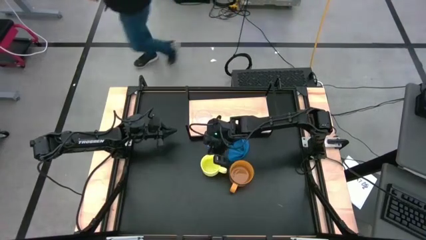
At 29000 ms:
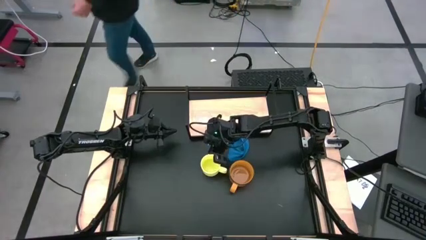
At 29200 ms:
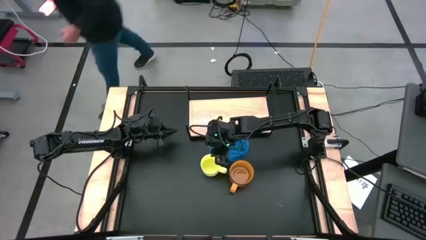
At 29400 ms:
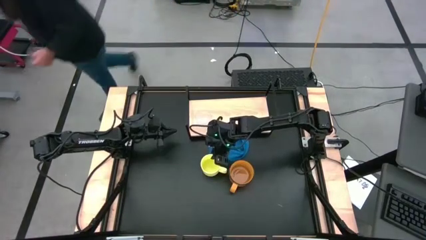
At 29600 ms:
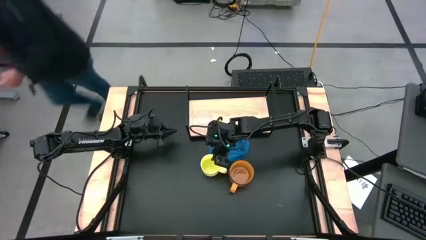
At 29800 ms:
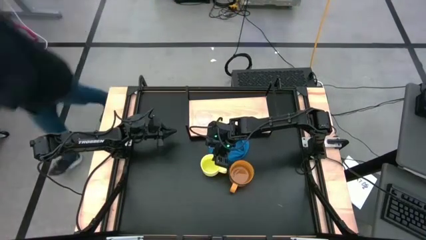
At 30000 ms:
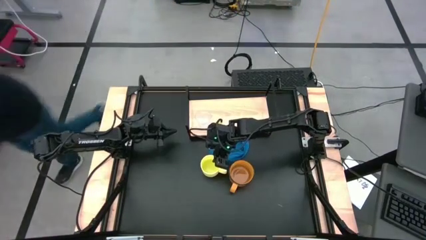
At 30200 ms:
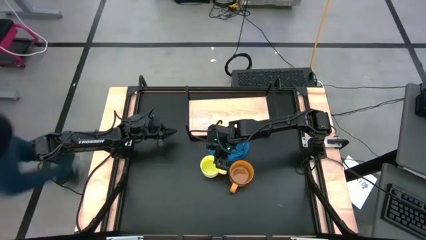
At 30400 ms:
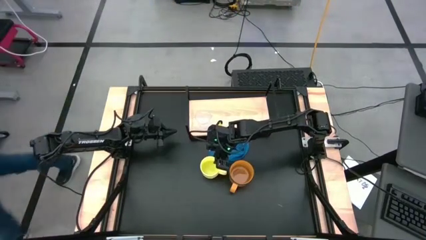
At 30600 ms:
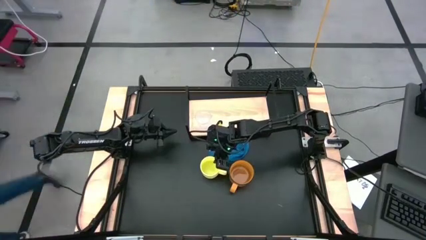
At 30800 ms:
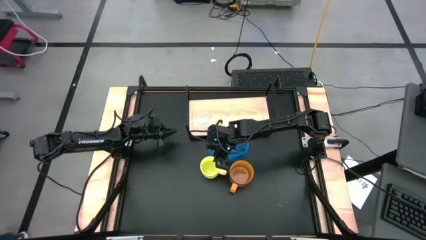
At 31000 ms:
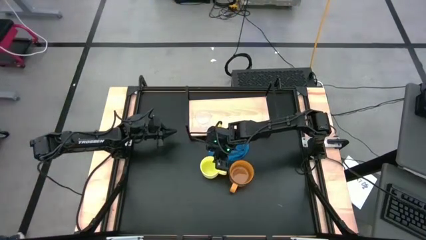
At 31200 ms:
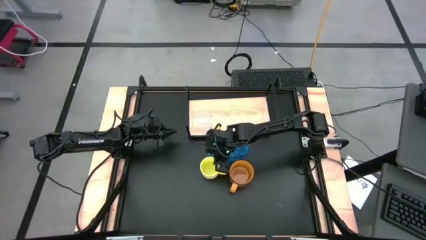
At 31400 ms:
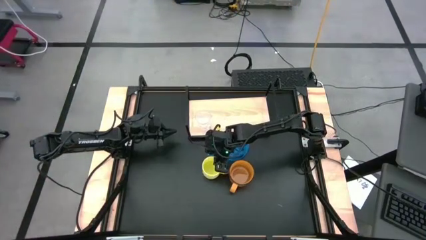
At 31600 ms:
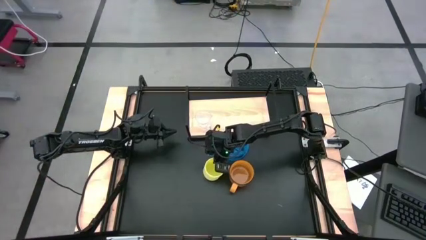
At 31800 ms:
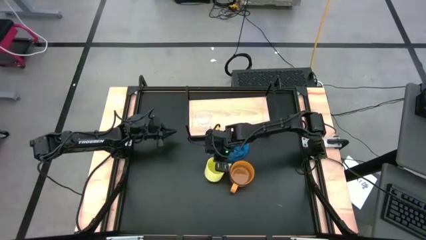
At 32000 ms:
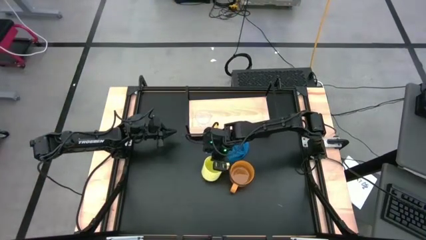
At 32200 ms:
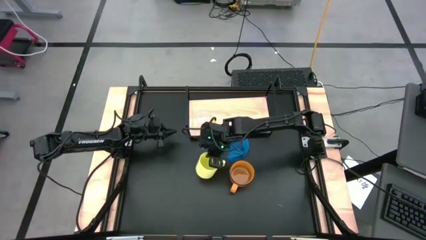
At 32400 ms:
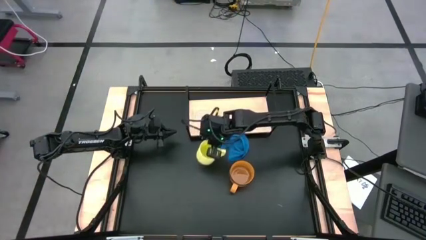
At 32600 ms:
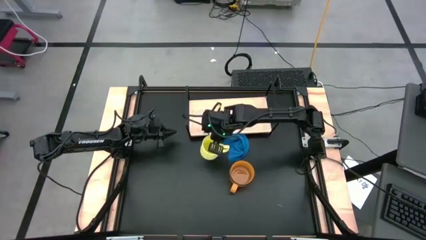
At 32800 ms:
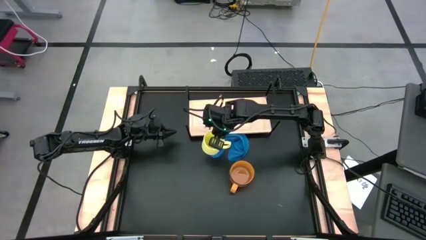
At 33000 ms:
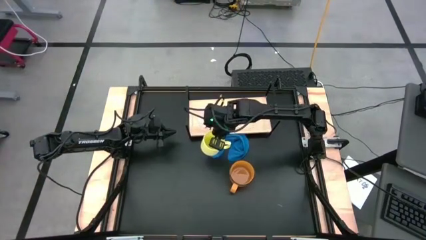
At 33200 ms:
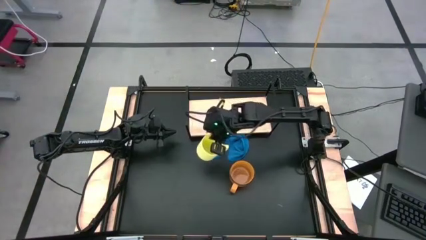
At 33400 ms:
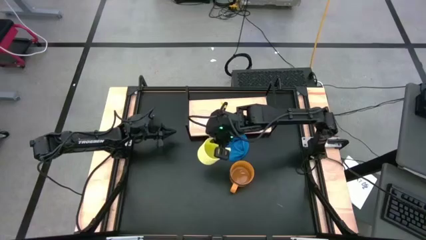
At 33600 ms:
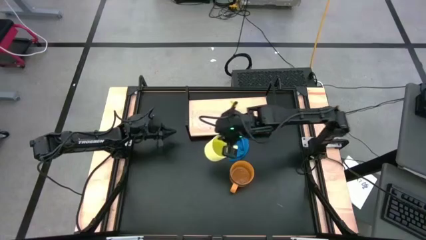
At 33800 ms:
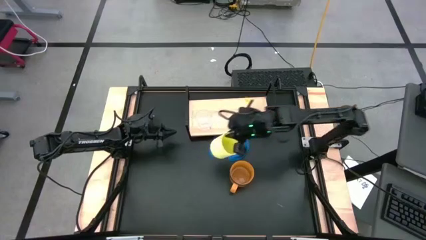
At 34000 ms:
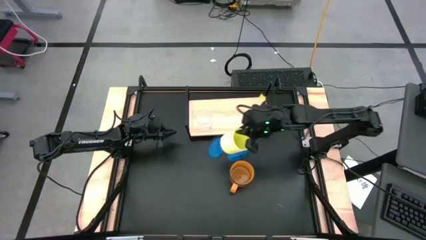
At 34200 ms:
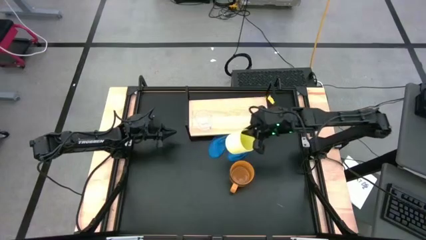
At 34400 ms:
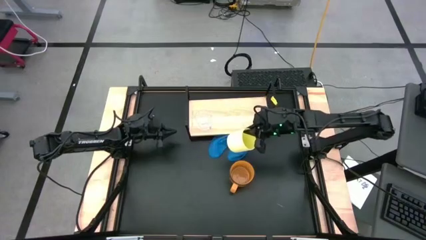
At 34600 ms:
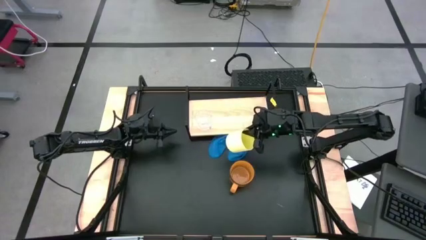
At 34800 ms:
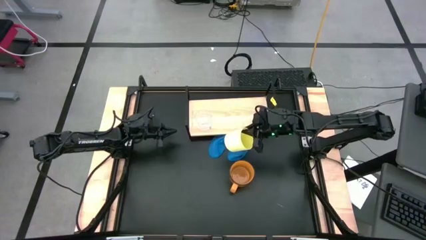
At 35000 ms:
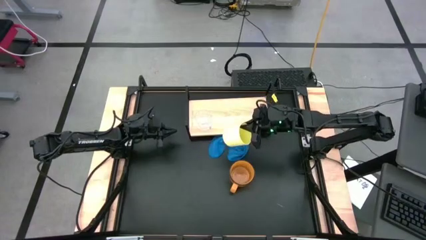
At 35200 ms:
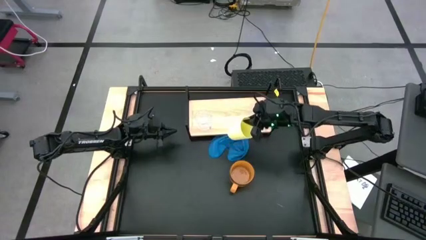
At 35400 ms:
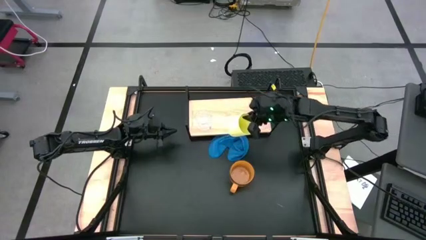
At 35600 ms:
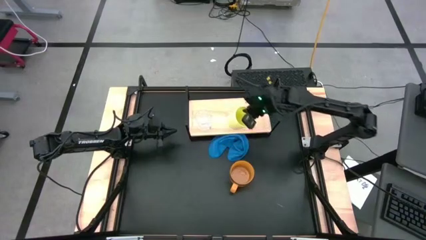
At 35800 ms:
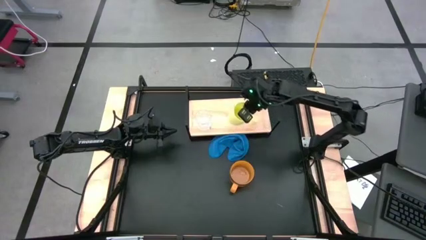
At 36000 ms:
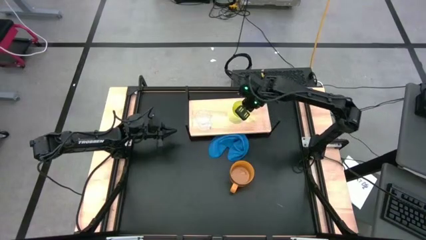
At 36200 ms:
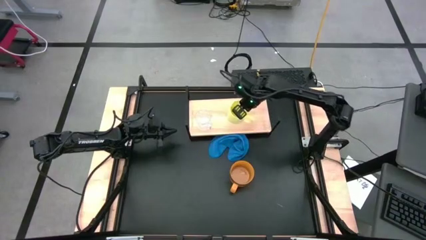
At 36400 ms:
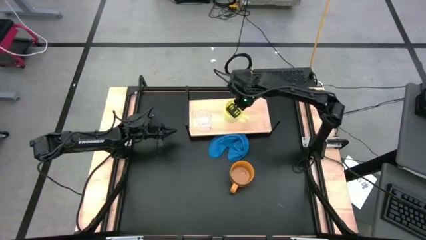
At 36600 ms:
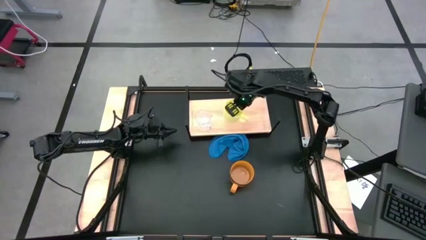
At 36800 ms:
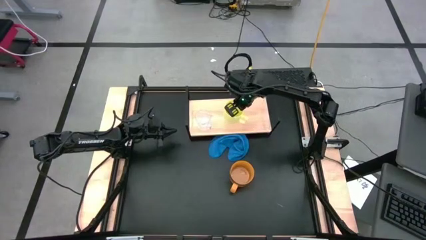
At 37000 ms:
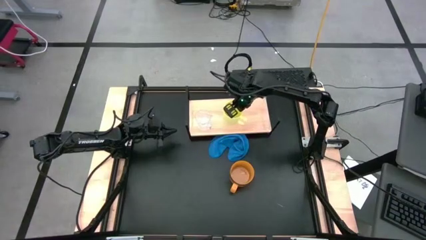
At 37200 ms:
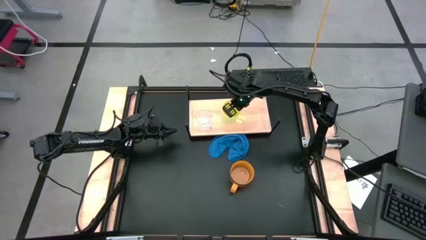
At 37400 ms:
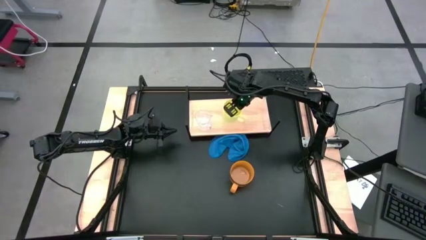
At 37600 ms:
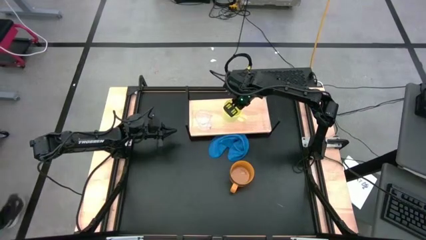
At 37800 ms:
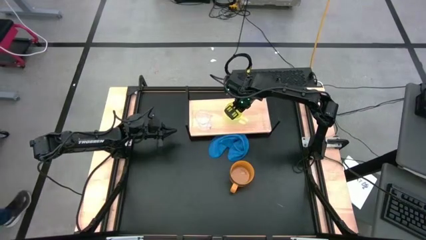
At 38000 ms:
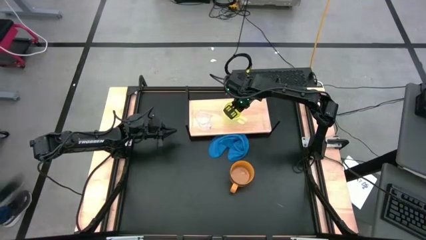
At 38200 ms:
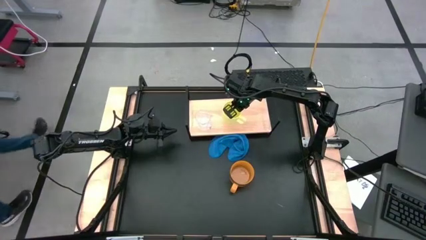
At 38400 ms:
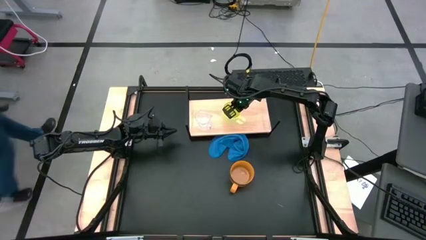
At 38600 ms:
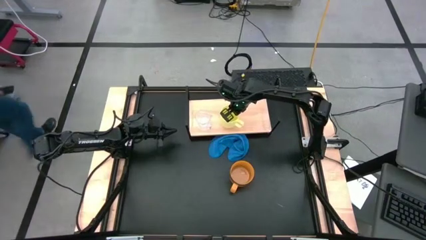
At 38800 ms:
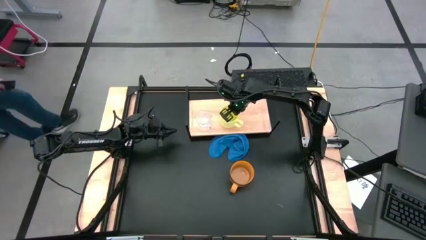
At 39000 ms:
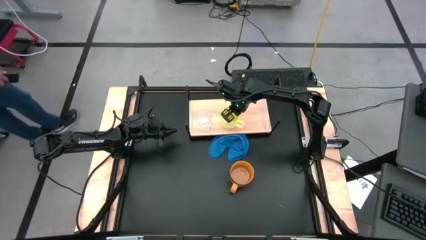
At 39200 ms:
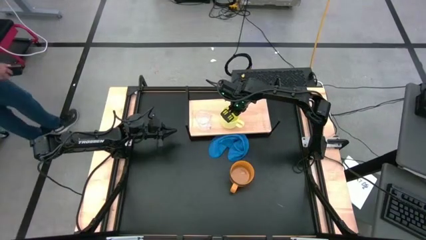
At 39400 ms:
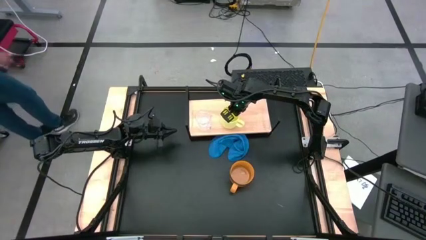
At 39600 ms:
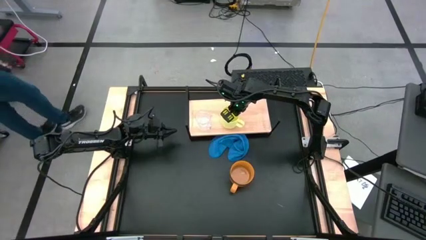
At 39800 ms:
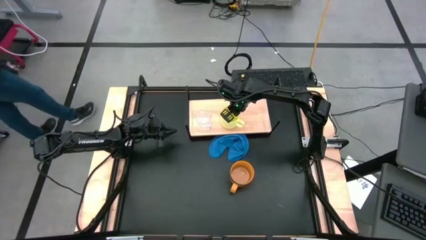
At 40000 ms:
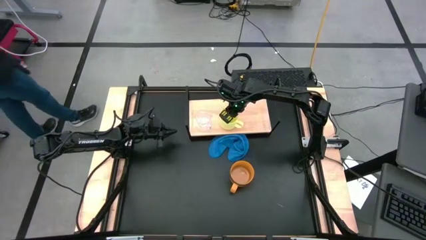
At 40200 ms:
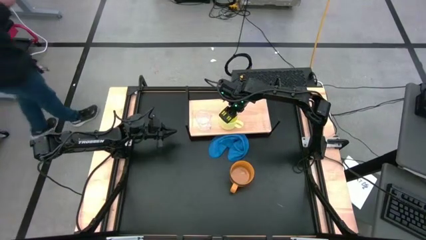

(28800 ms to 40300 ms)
Task: Stack small to large cups/mugs on shelf
Put the yellow mug on the shelf

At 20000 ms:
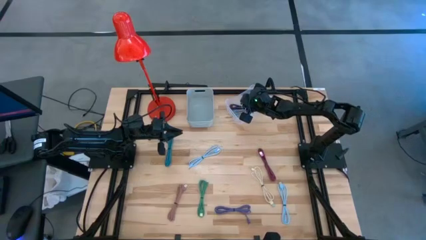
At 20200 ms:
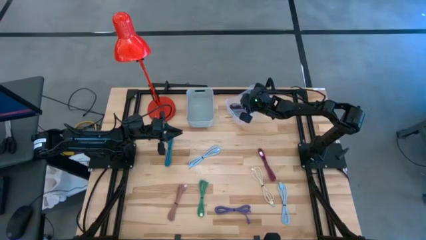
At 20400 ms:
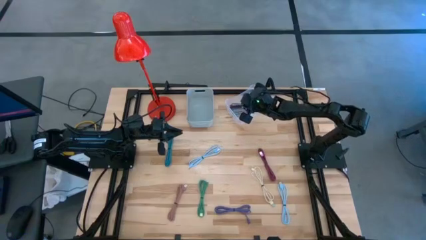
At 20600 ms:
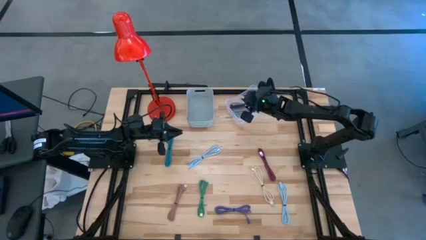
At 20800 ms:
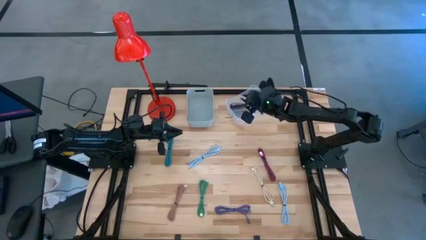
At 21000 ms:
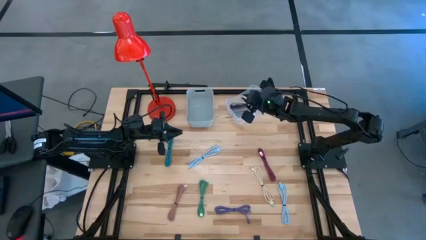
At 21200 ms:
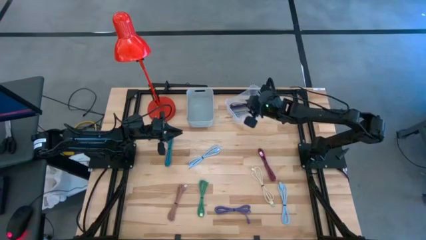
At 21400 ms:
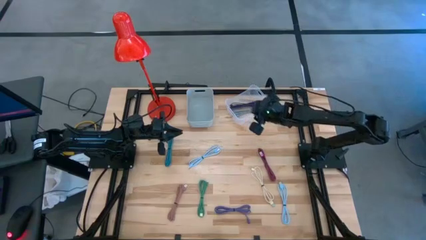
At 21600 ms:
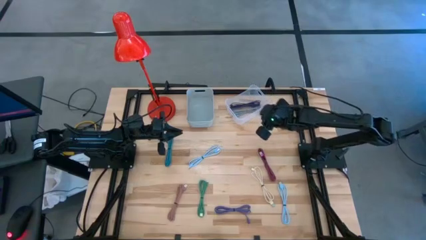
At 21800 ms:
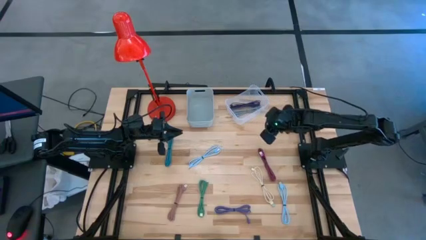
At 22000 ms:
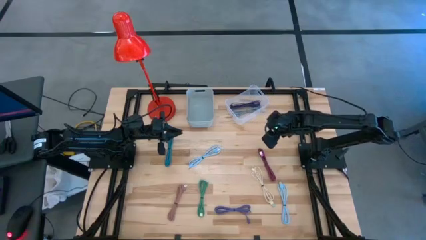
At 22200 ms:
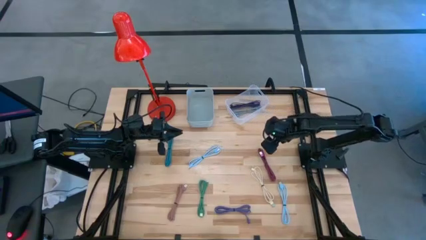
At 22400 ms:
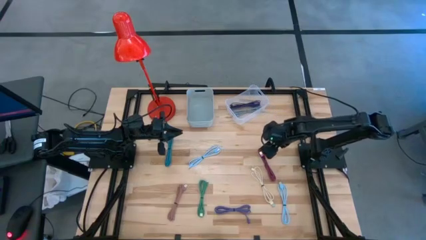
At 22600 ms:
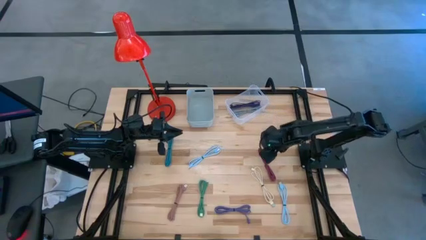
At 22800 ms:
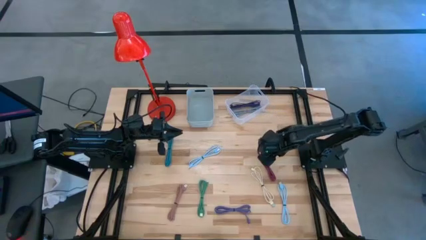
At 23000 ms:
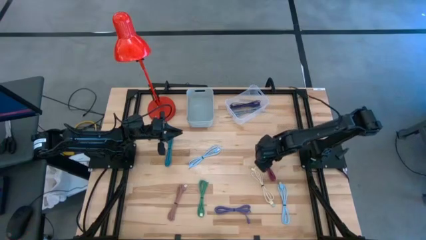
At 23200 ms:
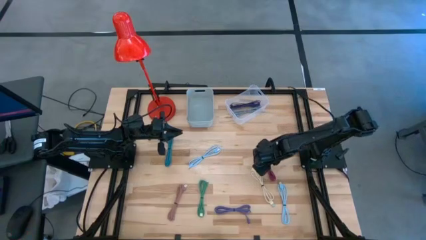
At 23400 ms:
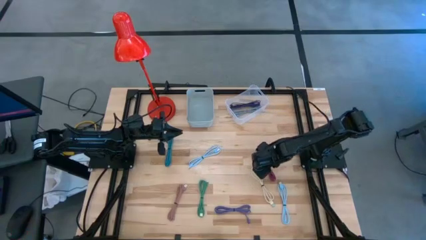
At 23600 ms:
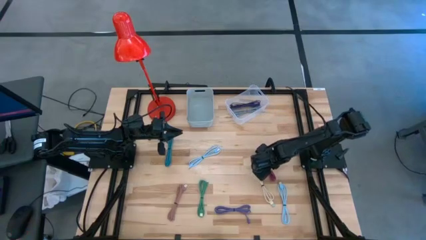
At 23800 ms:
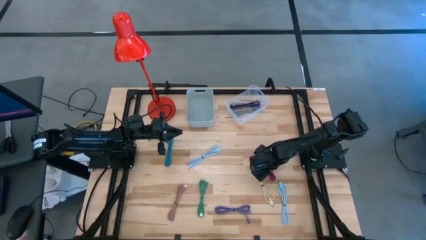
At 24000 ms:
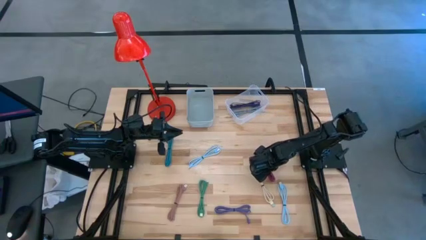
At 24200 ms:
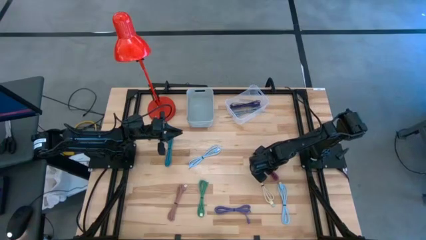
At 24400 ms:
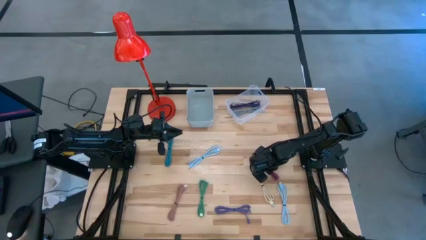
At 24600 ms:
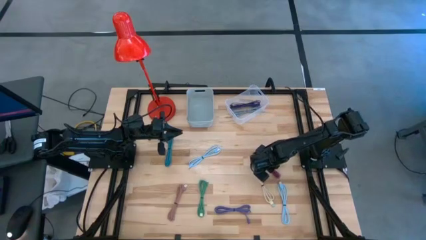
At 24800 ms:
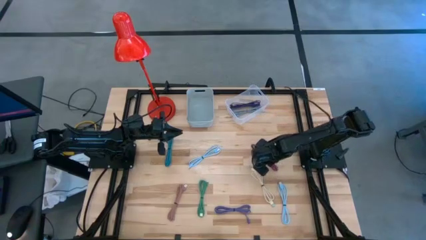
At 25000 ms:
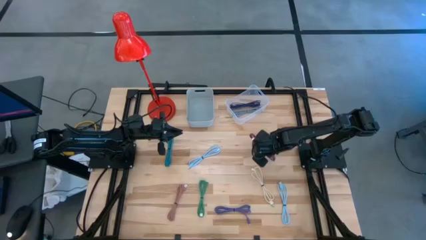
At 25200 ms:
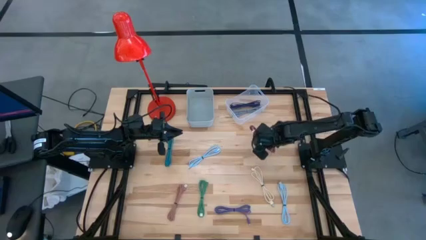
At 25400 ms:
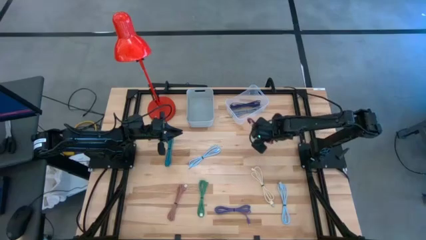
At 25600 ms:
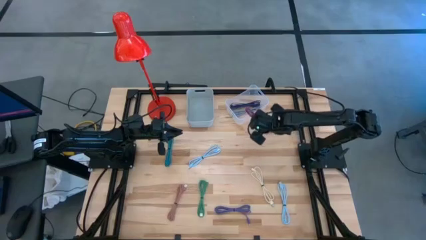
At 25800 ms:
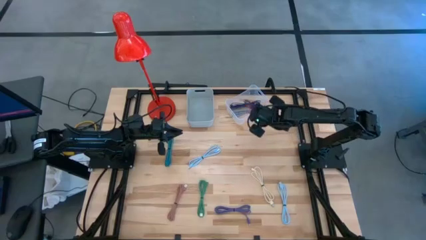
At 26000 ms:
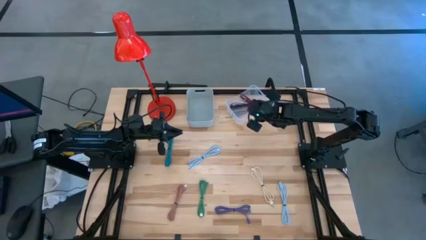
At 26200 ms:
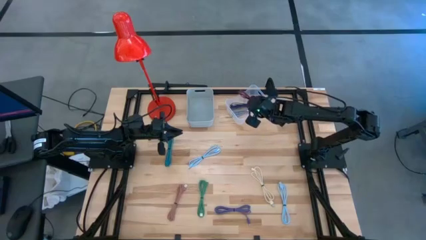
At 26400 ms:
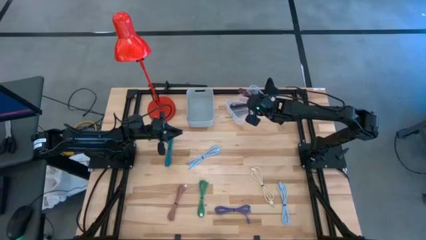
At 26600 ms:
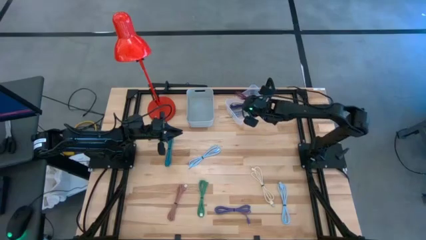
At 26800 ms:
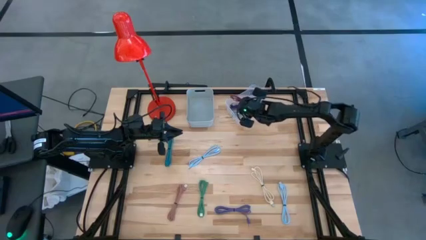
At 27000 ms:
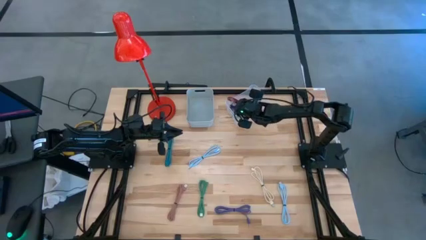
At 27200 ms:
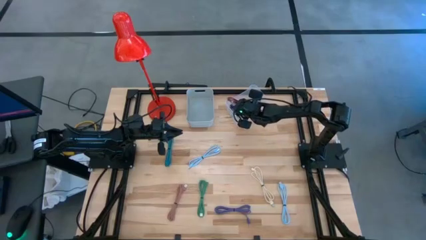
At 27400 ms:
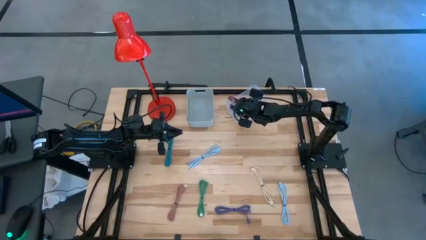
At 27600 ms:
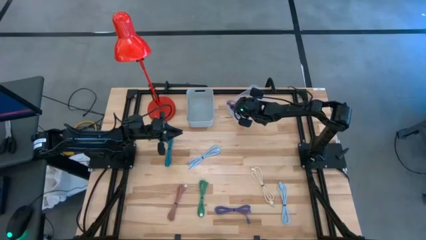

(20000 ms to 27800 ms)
Task: Pick & Place USB Port
Put the pink charger cable into the transparent bin
